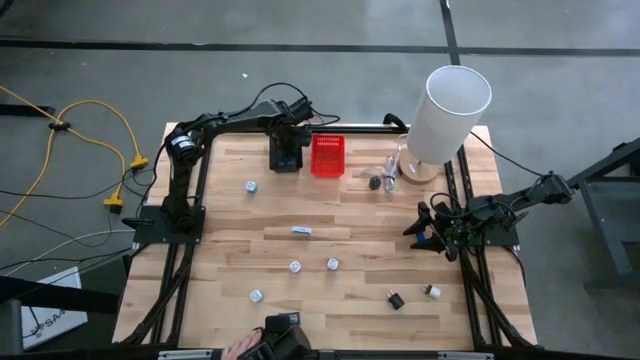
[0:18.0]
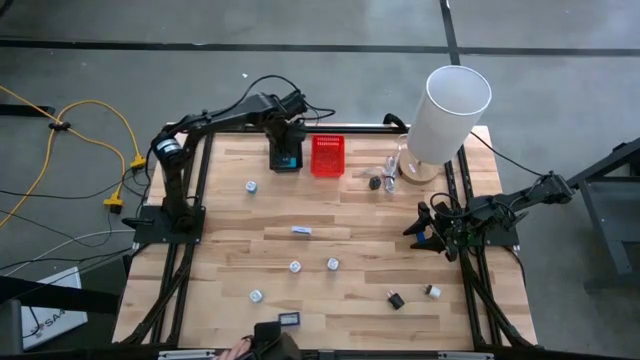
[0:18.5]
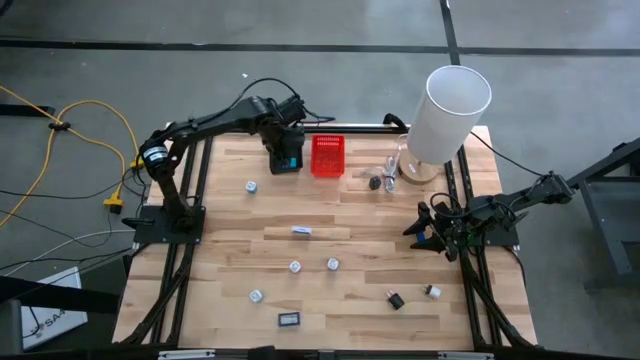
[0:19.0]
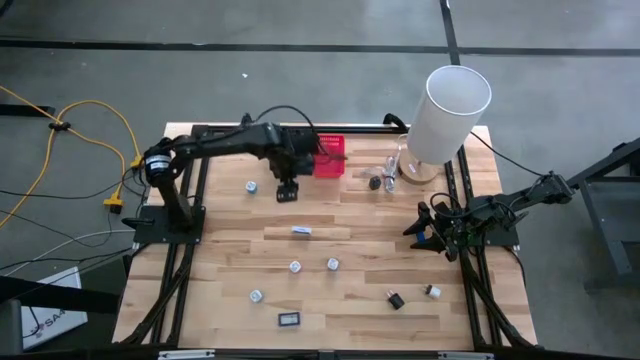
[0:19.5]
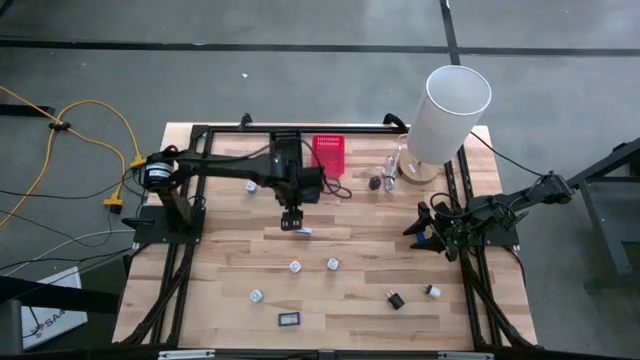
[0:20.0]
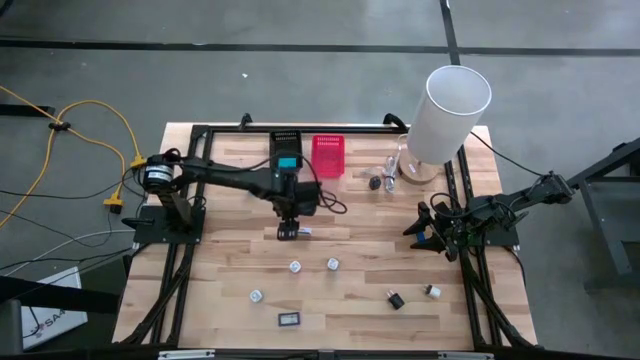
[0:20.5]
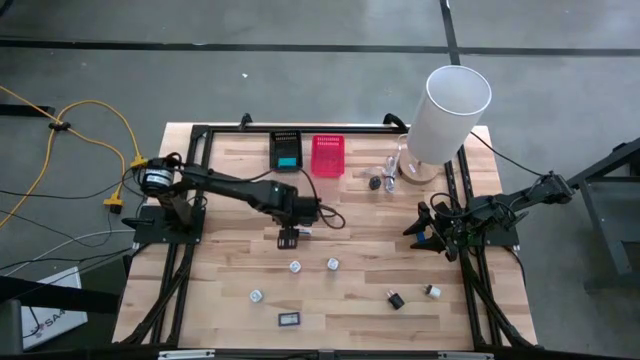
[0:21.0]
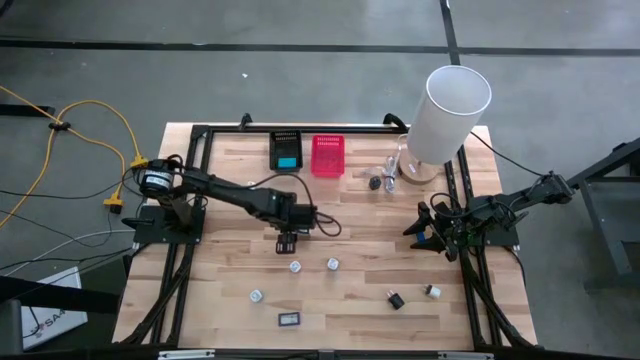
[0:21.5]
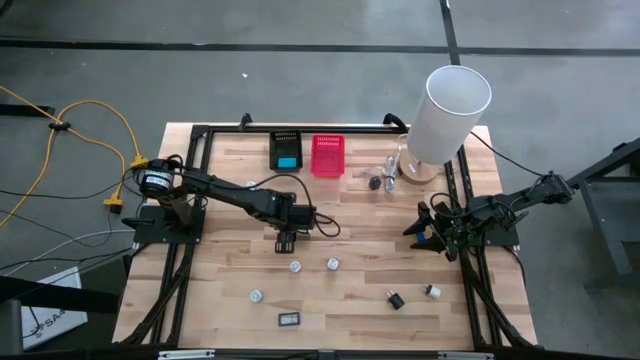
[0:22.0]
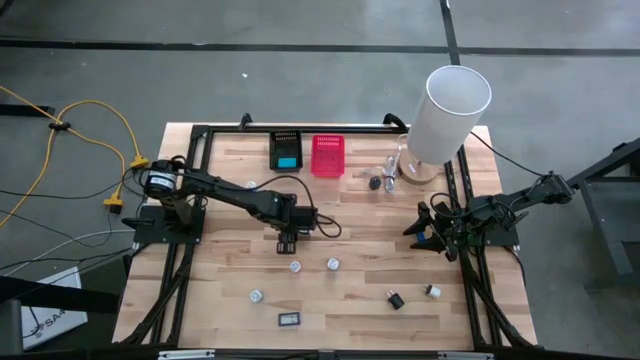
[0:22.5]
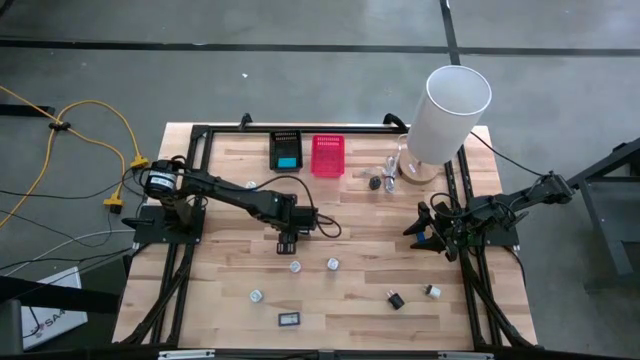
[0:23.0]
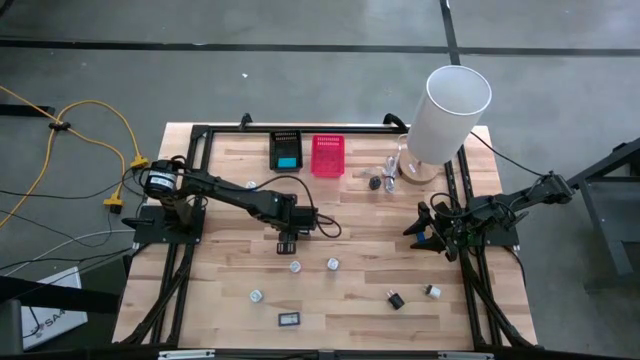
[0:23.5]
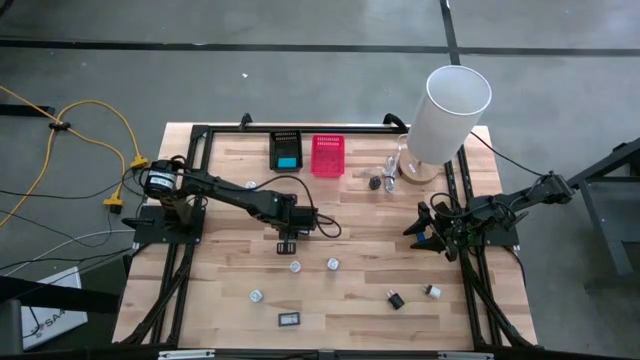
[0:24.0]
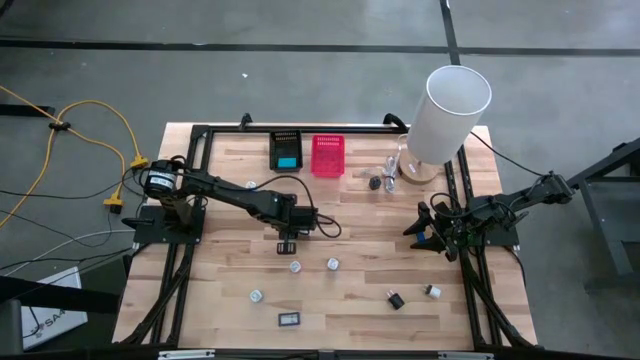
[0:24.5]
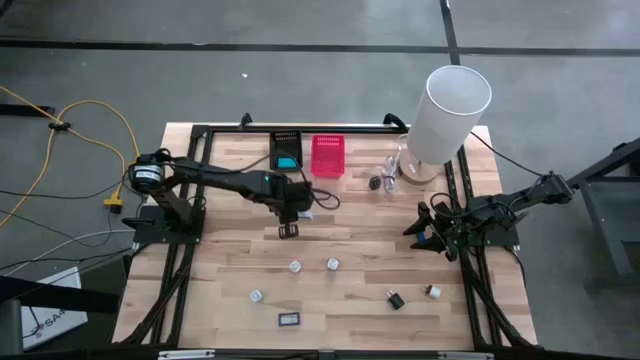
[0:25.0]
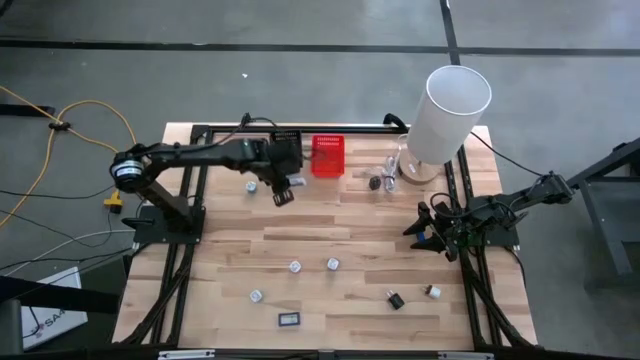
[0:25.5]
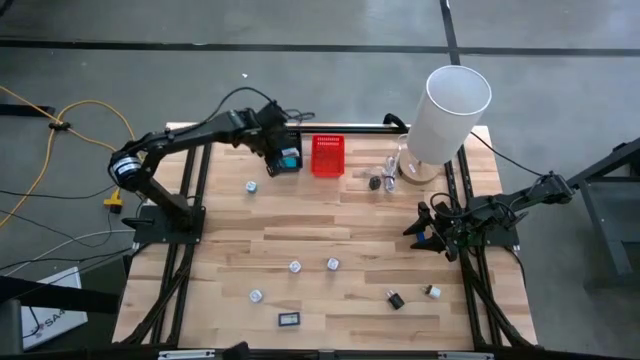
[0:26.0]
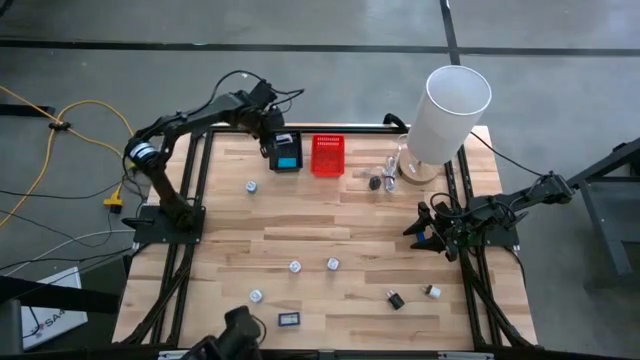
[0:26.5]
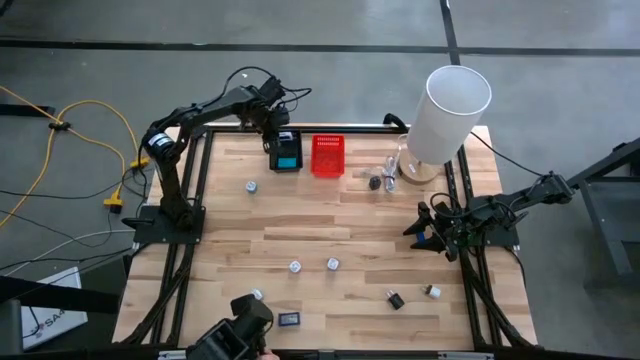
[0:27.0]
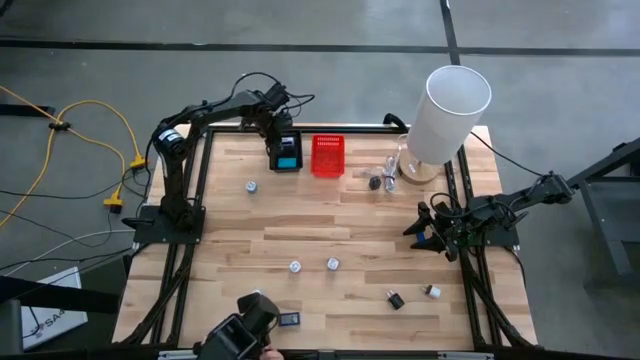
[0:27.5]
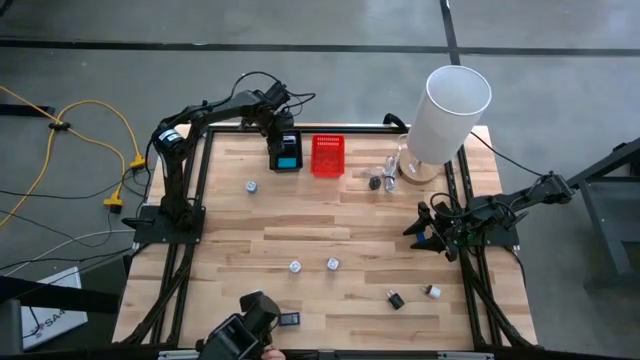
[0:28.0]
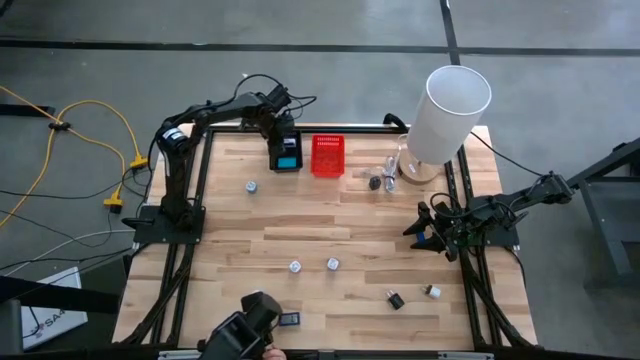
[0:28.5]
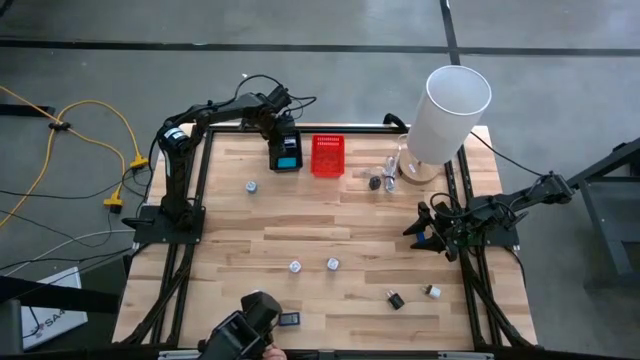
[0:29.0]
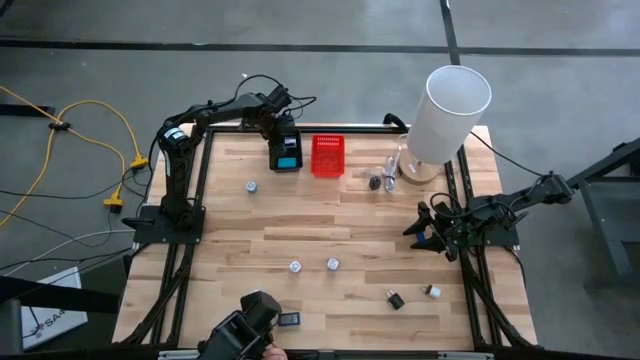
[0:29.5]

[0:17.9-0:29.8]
Task: Pick & Place Office items
Put the white digital timer into the black basket

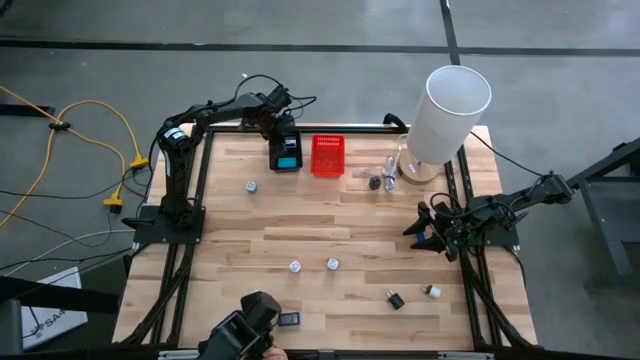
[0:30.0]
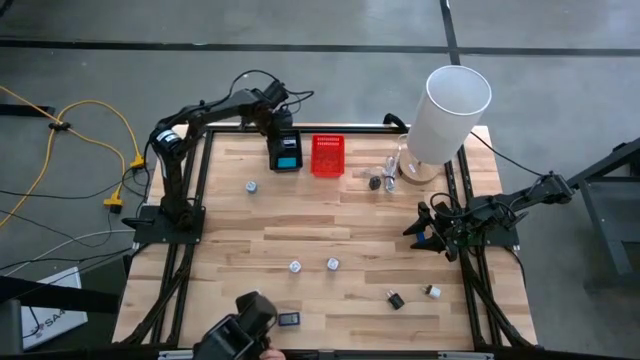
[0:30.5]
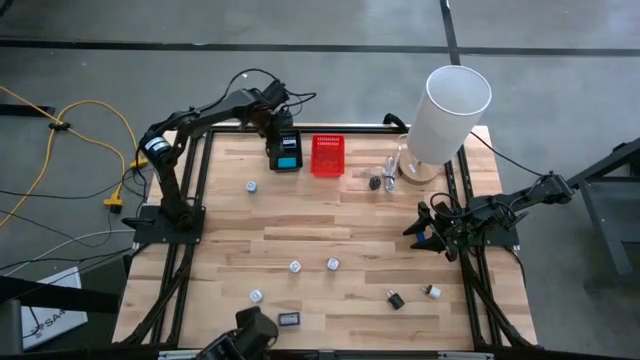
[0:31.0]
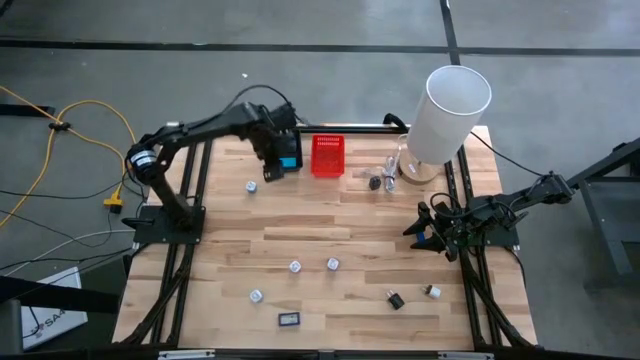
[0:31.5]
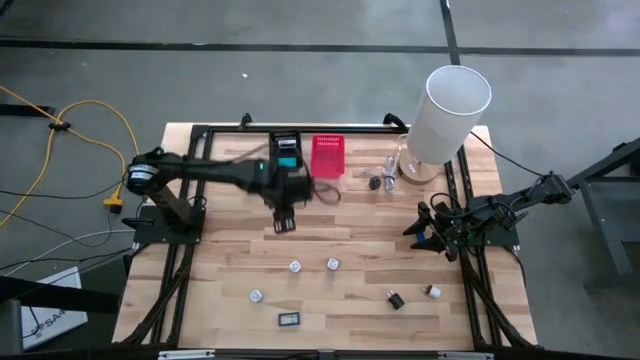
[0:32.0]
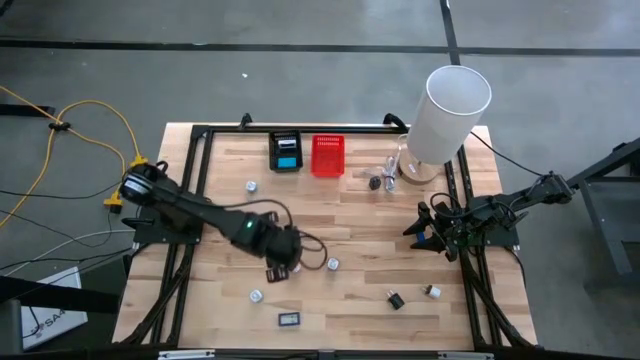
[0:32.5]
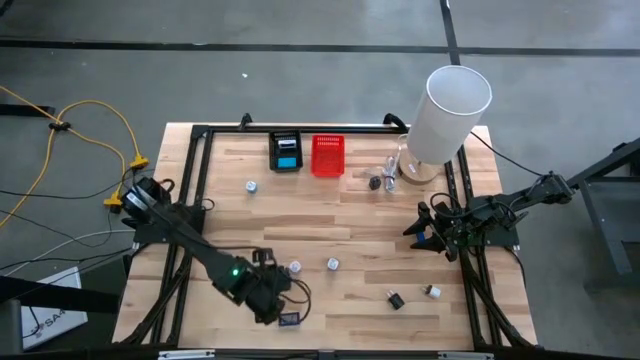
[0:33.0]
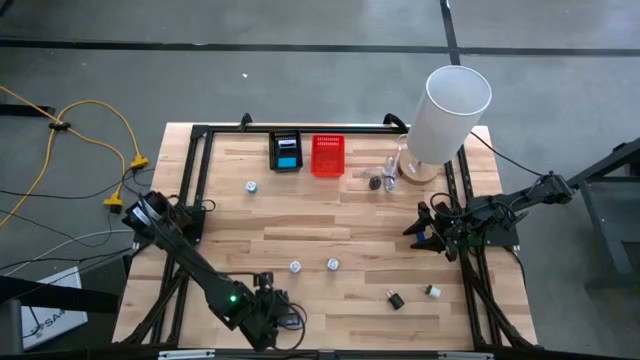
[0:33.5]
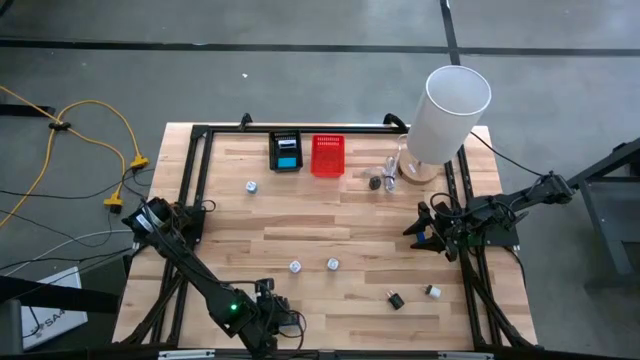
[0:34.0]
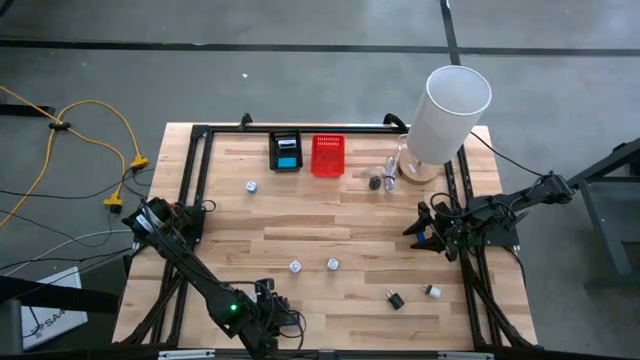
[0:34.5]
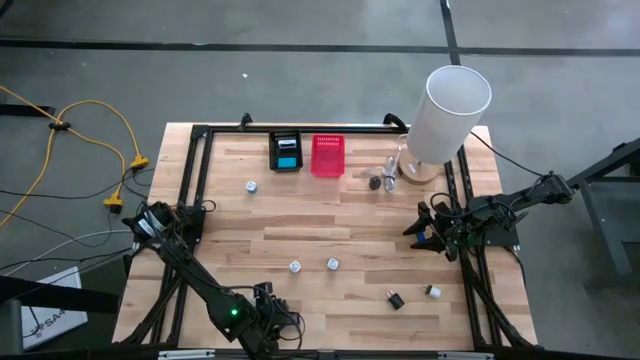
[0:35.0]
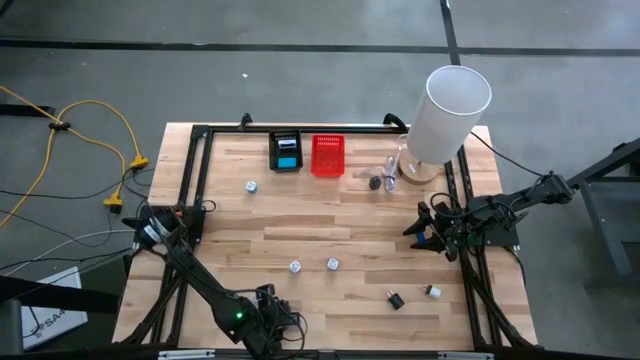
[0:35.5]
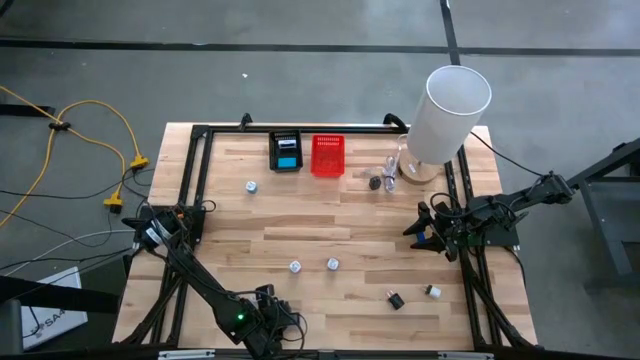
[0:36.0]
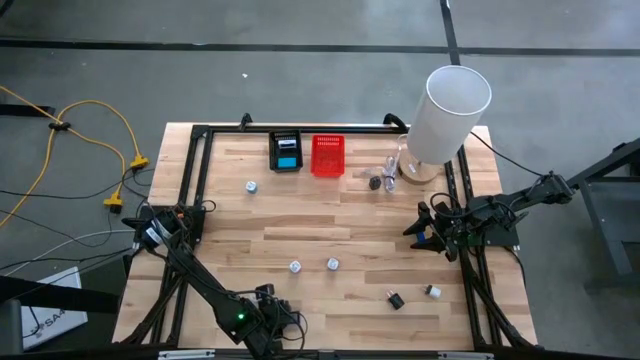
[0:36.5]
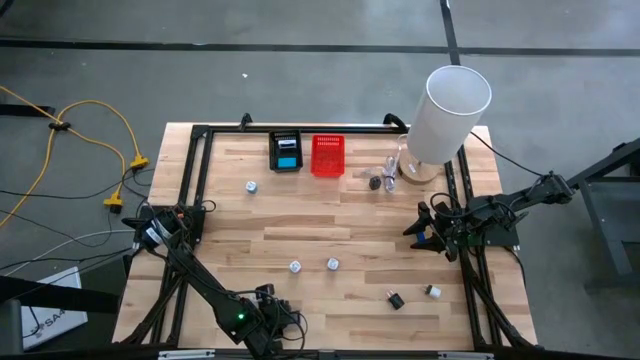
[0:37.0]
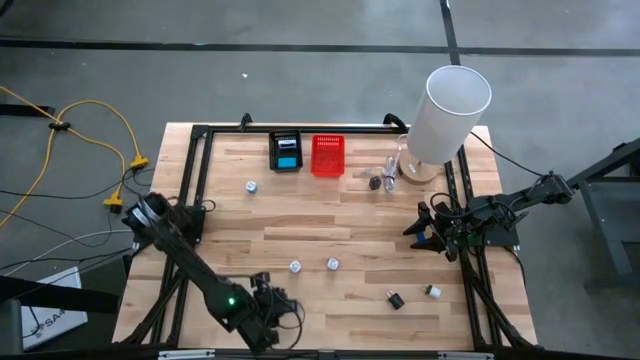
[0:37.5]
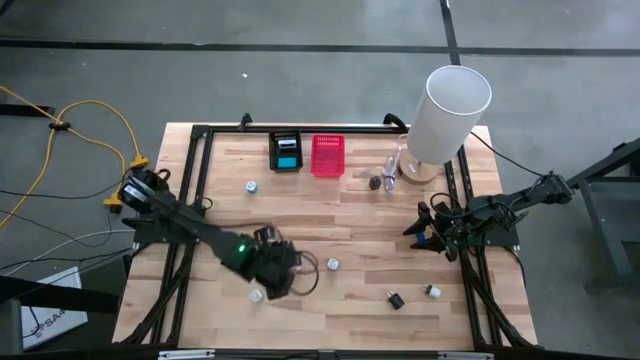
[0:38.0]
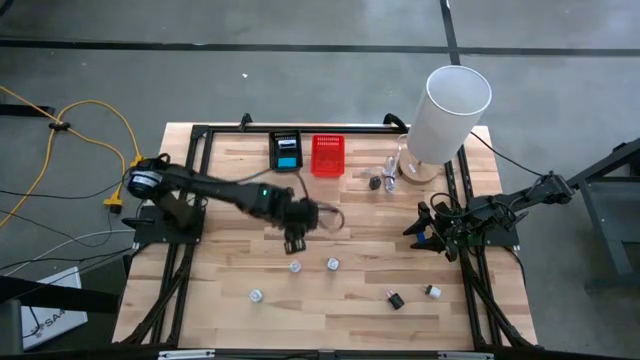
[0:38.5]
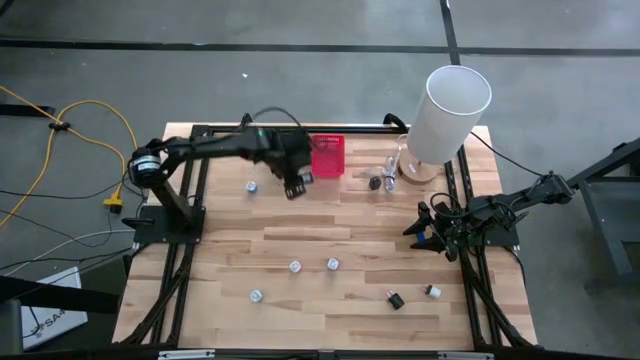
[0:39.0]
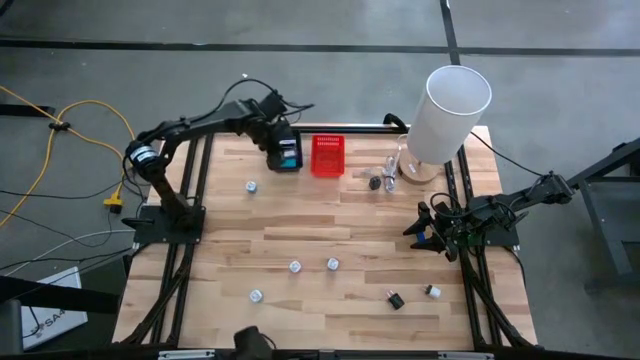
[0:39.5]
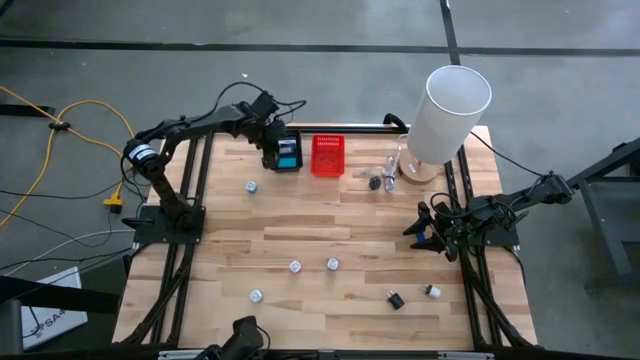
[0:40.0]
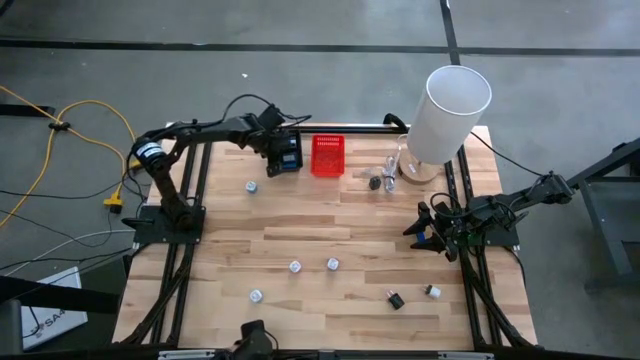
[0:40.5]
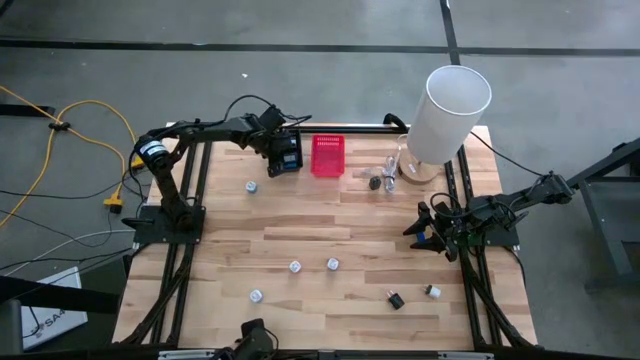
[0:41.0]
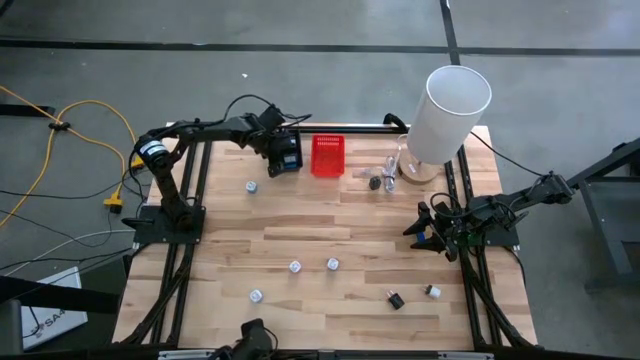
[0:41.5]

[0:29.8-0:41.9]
Put the bottom blue digital timer into the black basket
